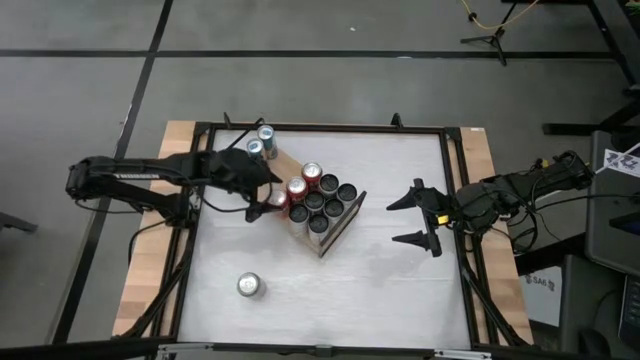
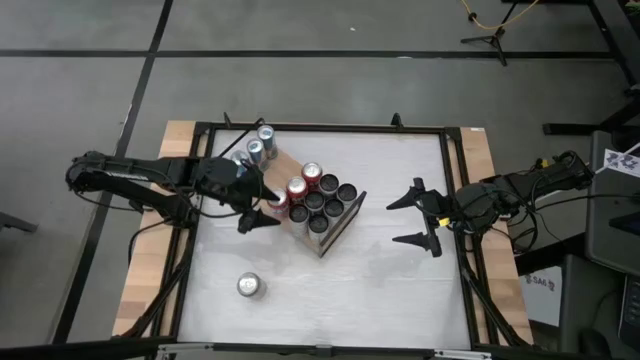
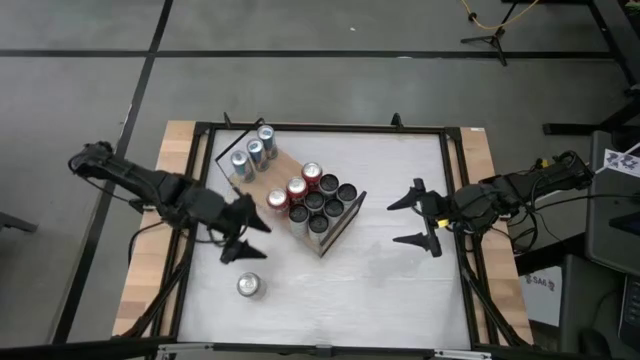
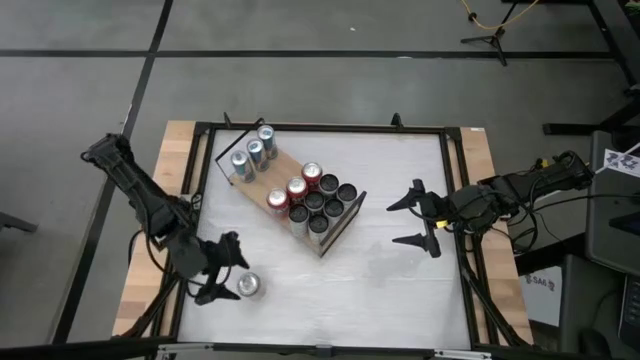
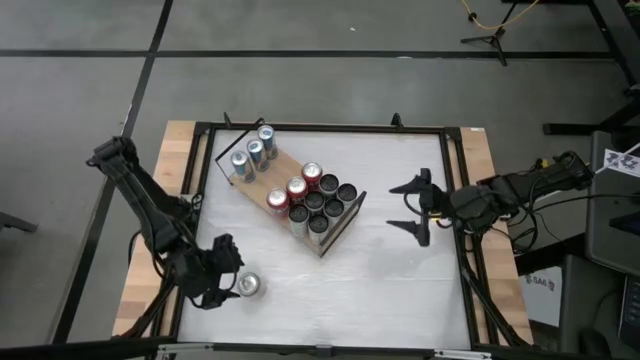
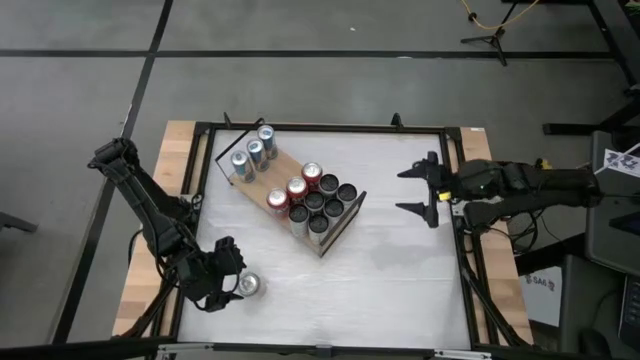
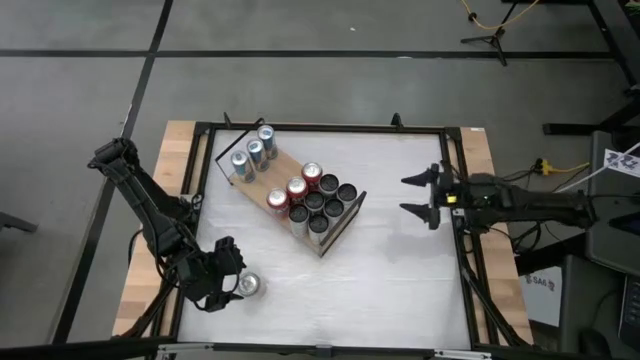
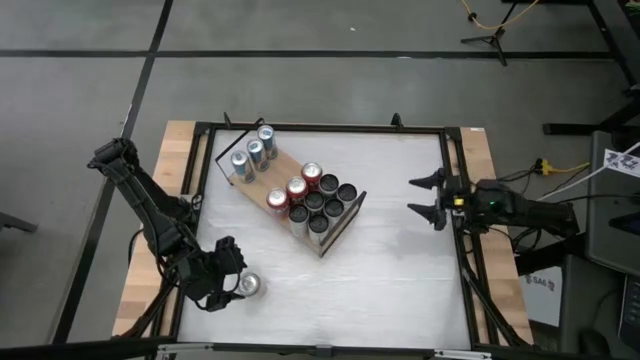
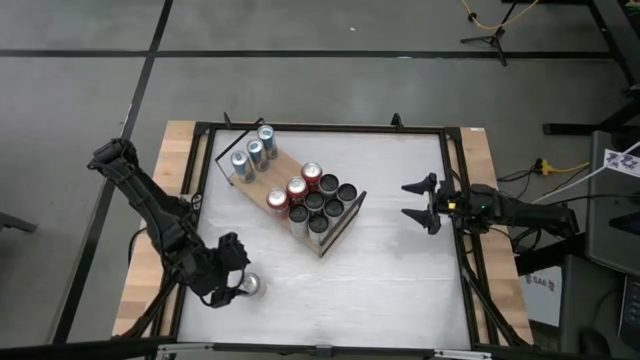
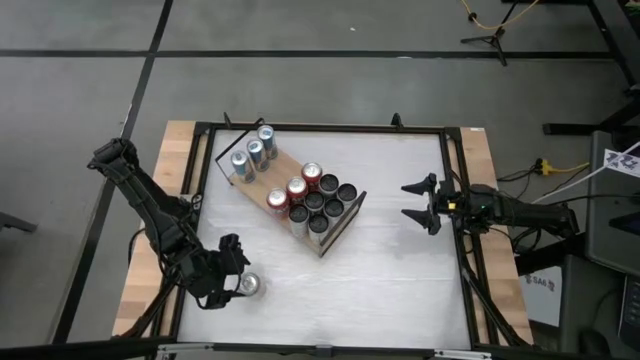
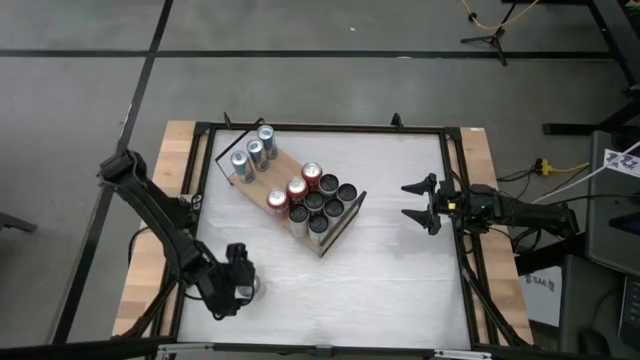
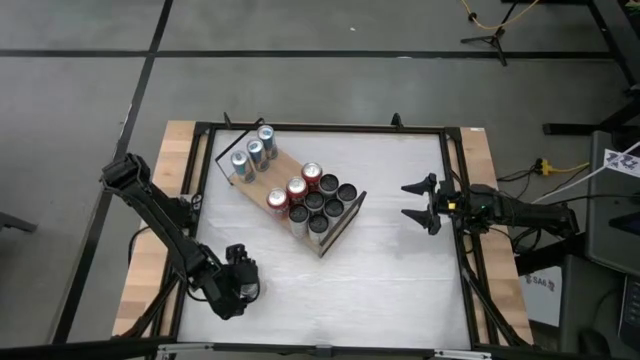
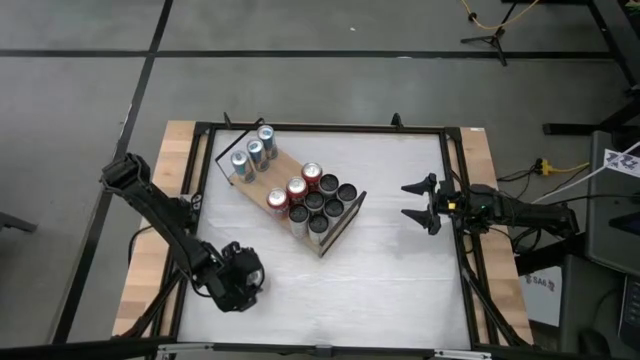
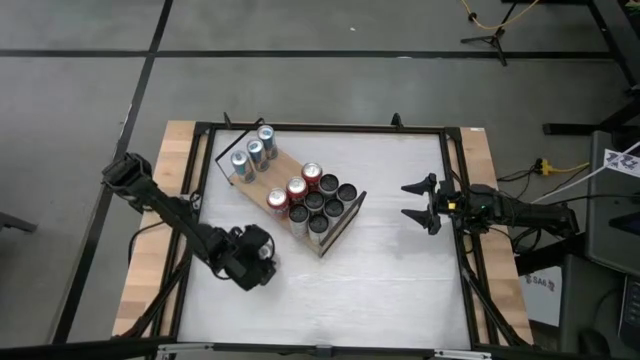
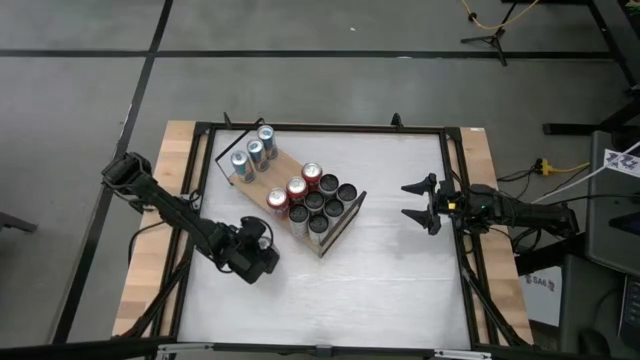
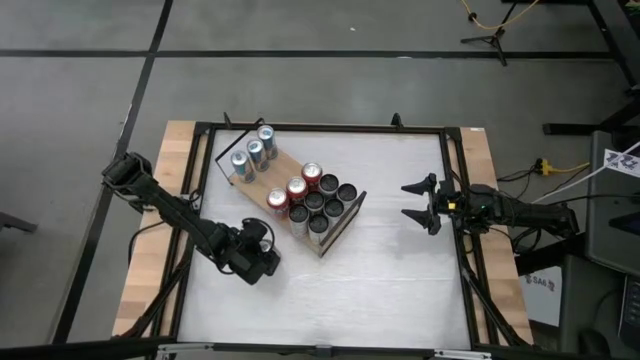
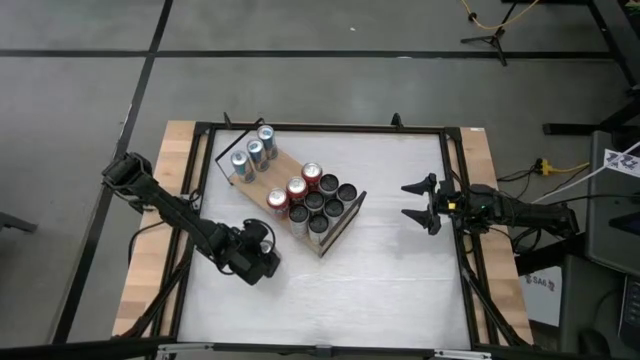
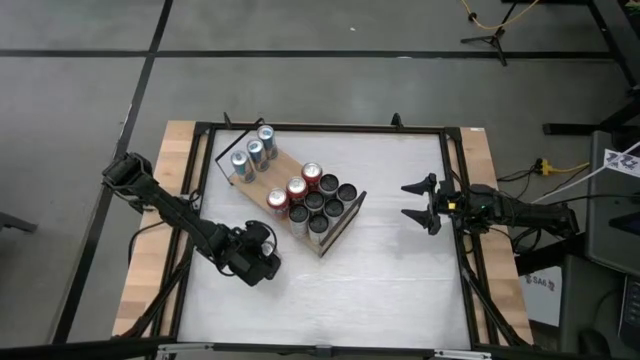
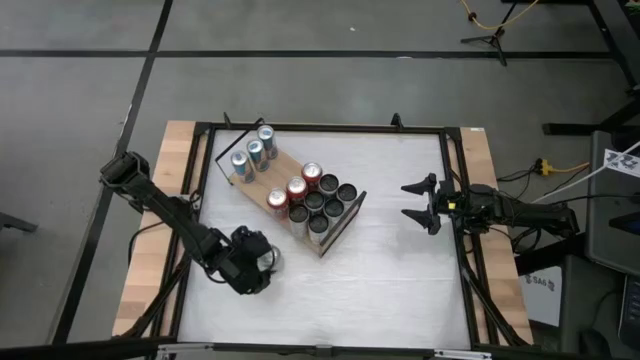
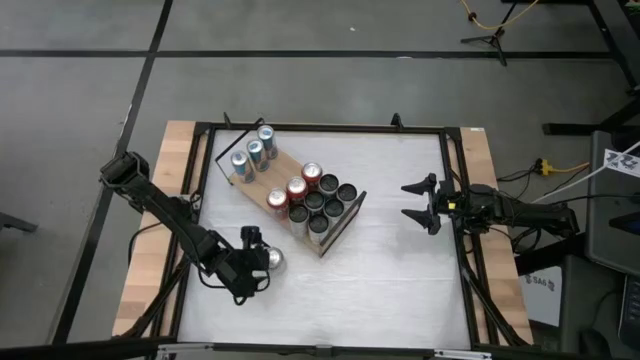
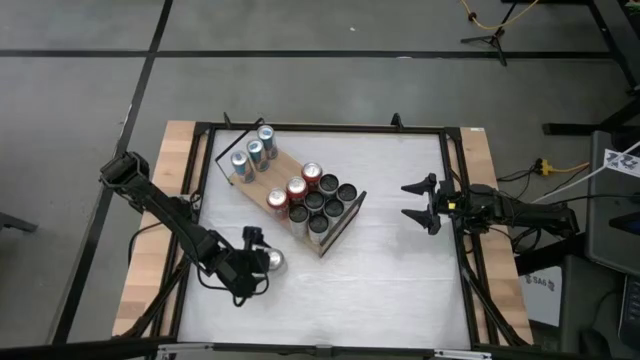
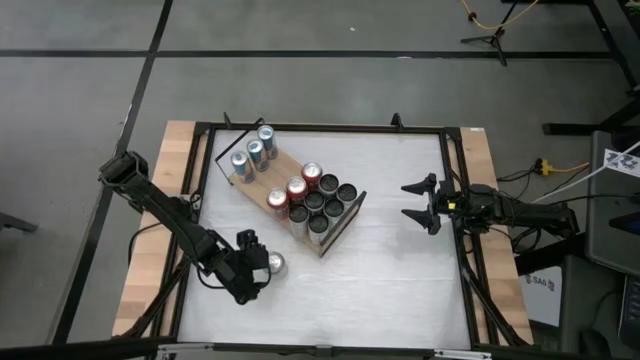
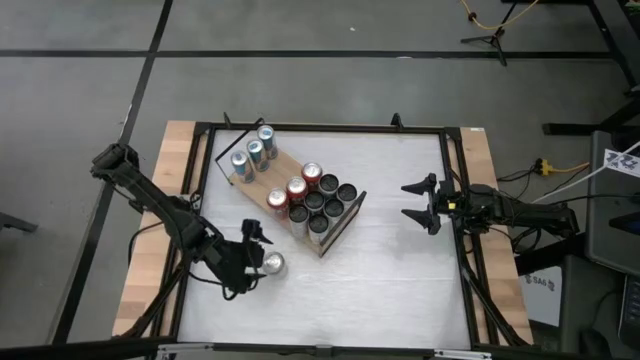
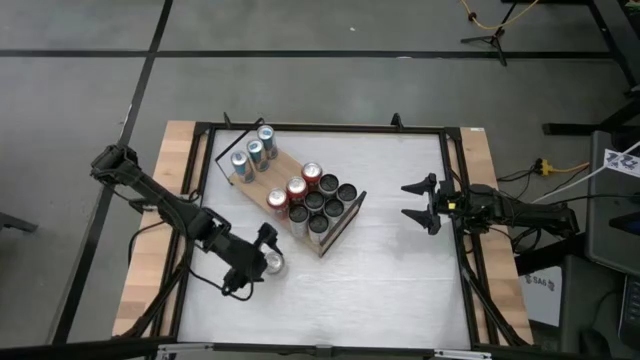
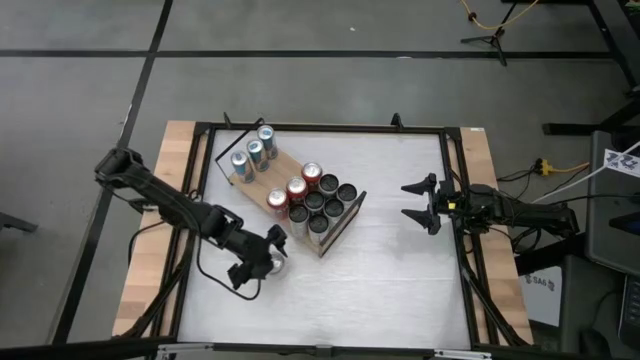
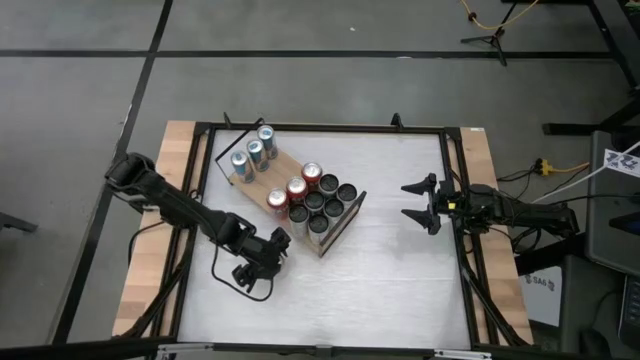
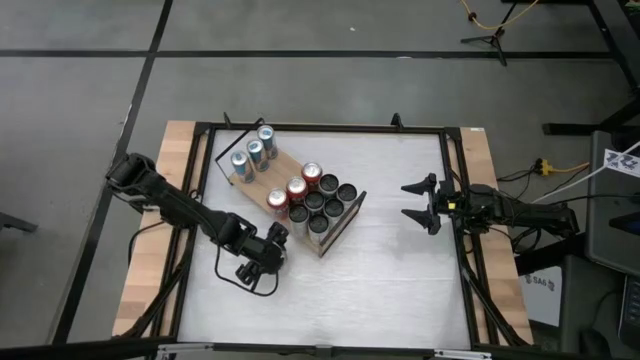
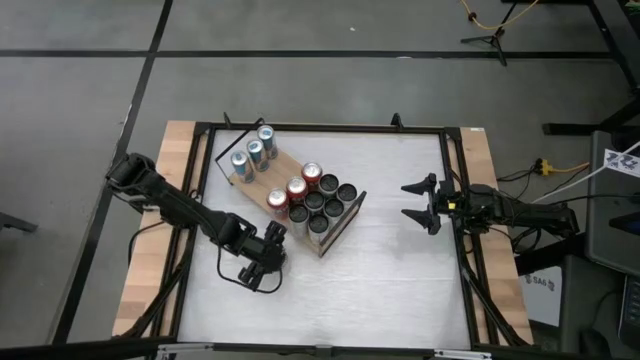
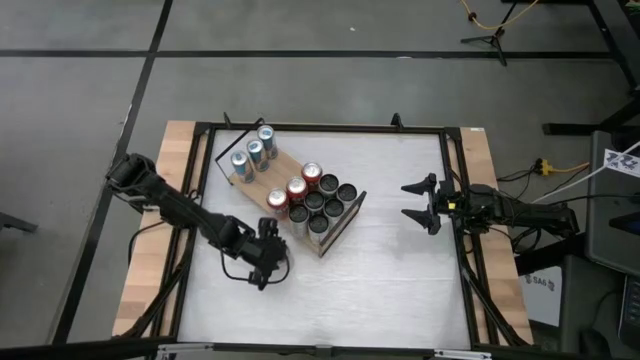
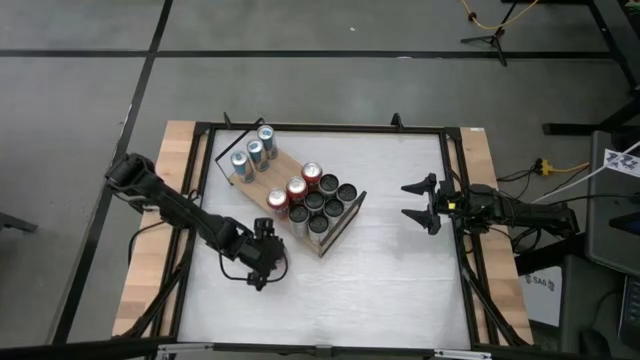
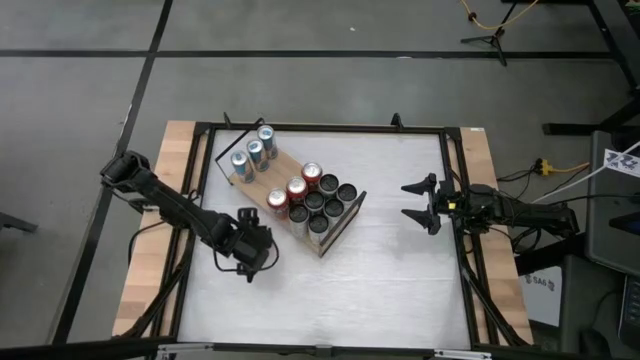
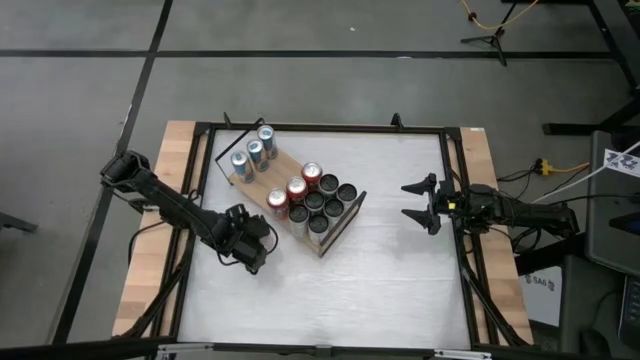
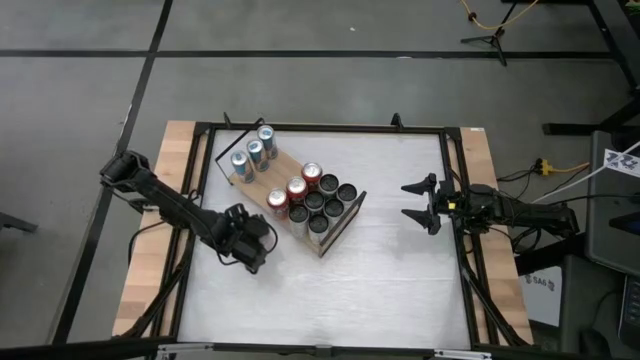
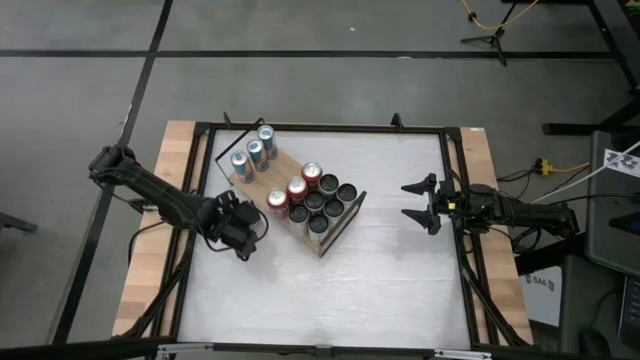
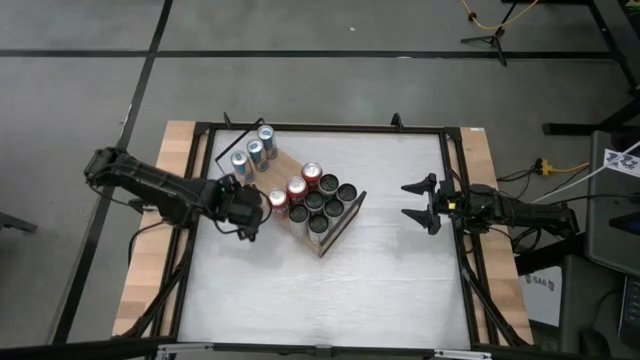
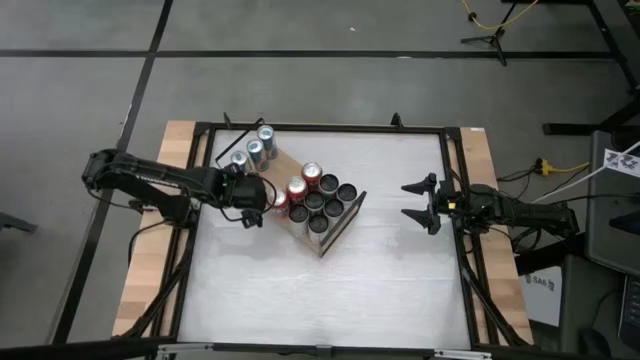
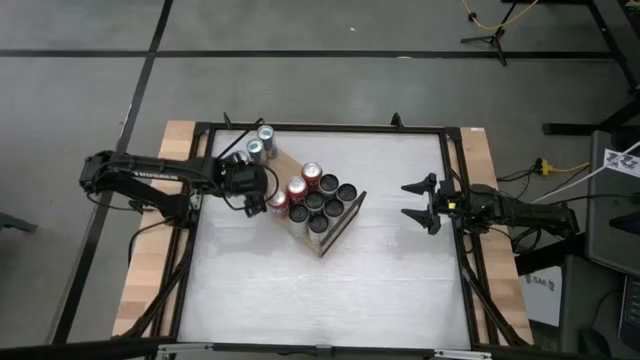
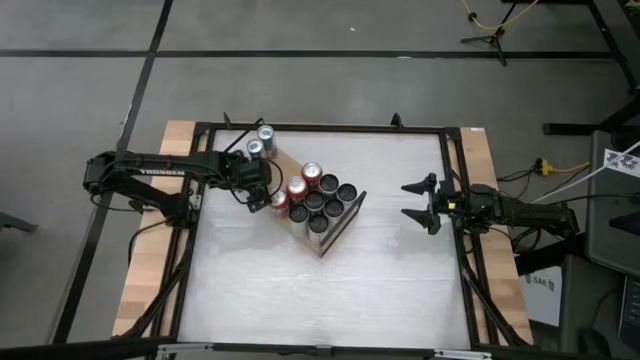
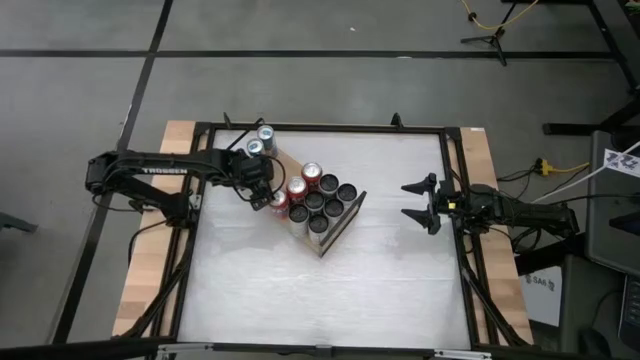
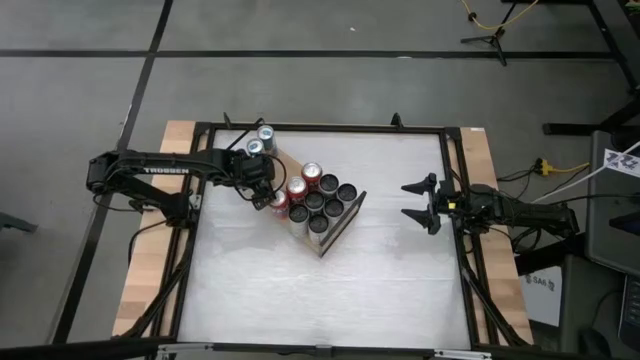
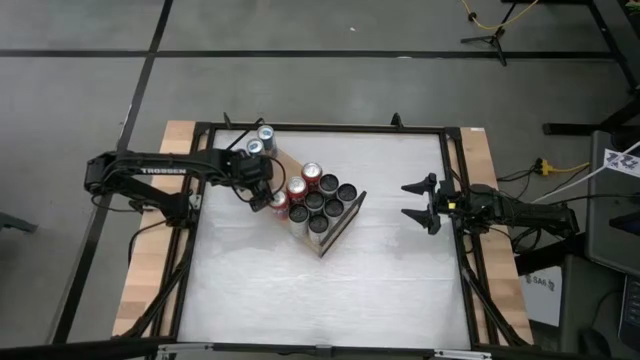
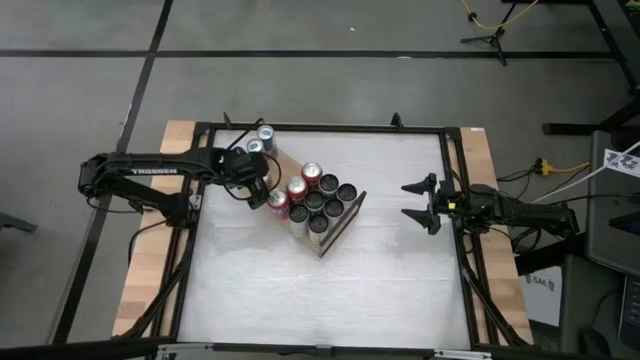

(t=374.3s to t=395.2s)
Task: Place canned beverage on shelf
Put the red-silver soda can on the shelf
